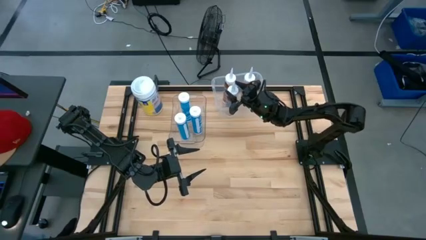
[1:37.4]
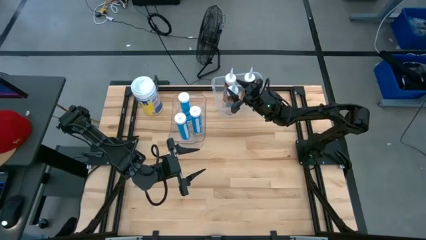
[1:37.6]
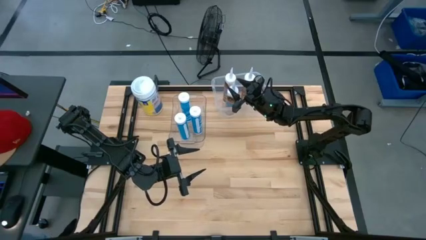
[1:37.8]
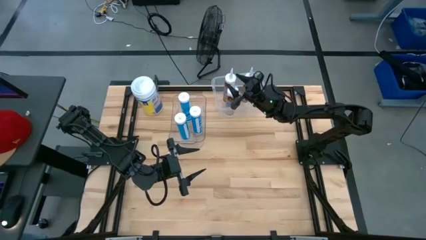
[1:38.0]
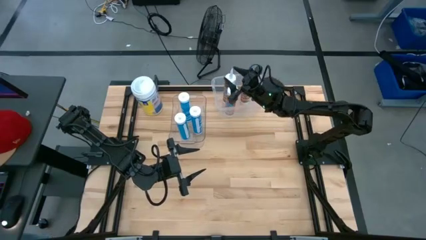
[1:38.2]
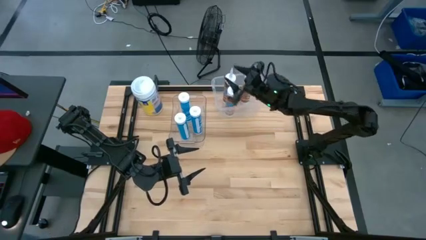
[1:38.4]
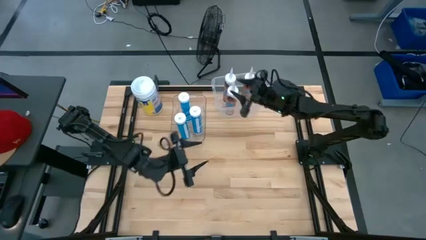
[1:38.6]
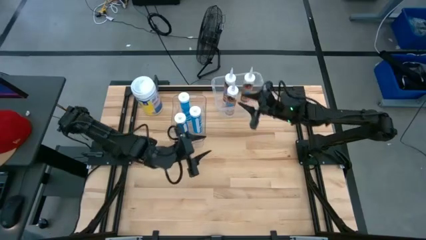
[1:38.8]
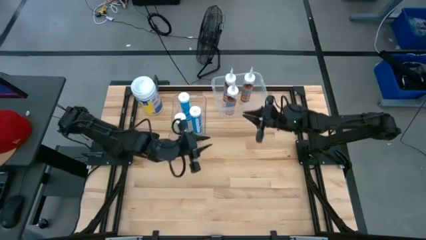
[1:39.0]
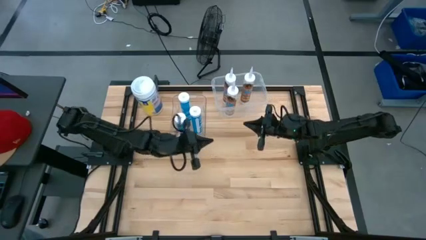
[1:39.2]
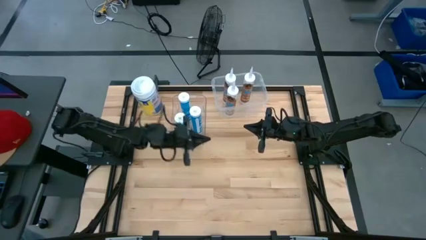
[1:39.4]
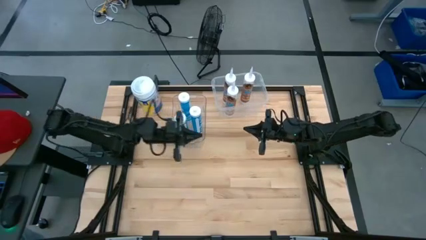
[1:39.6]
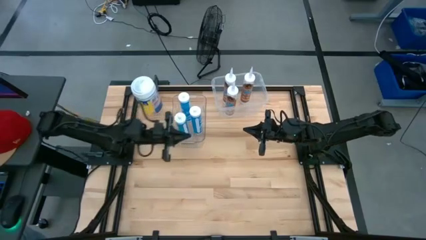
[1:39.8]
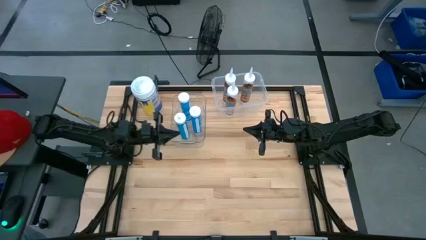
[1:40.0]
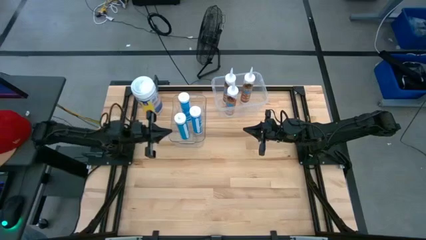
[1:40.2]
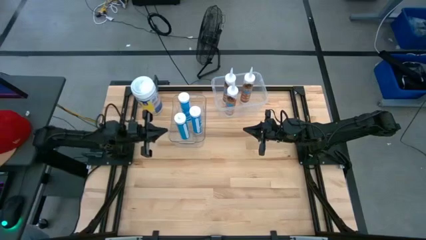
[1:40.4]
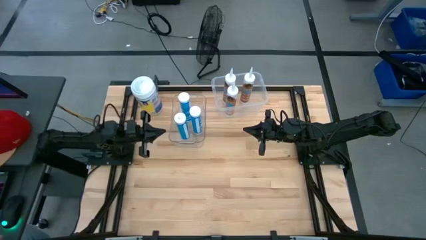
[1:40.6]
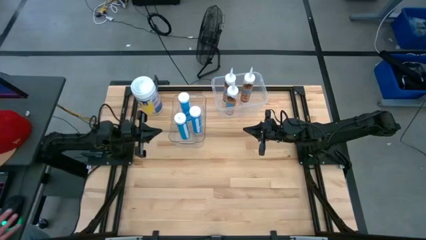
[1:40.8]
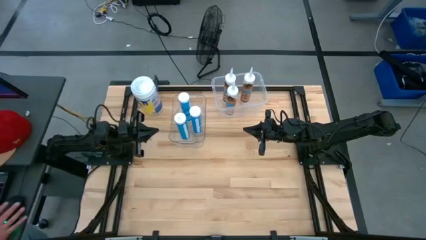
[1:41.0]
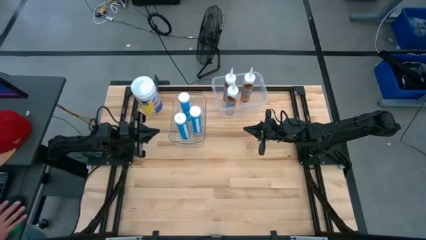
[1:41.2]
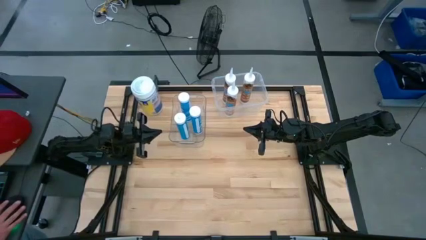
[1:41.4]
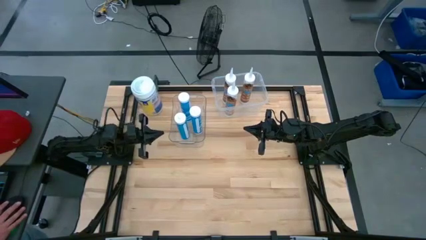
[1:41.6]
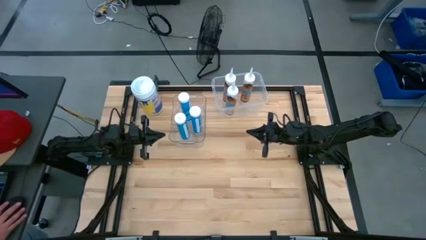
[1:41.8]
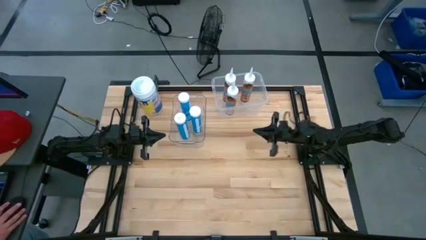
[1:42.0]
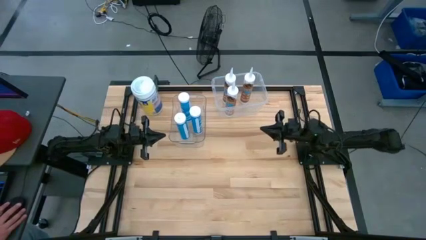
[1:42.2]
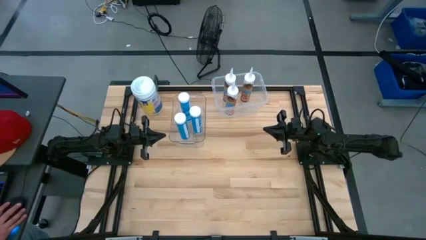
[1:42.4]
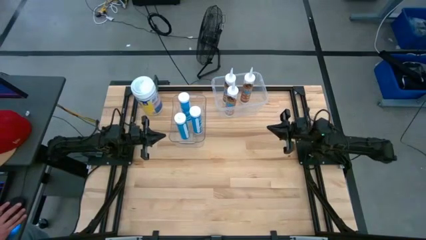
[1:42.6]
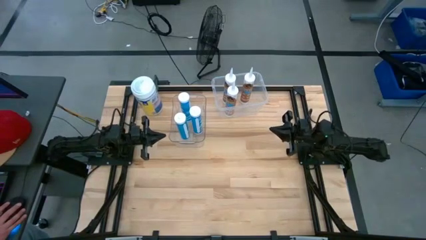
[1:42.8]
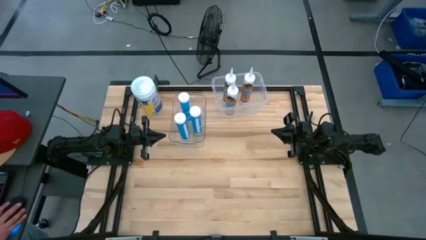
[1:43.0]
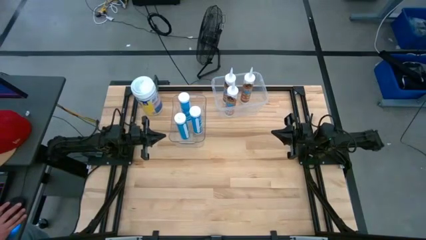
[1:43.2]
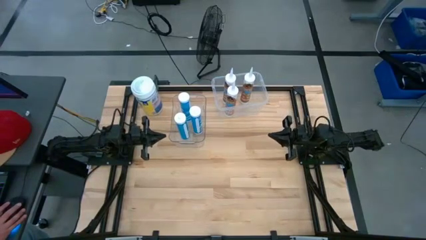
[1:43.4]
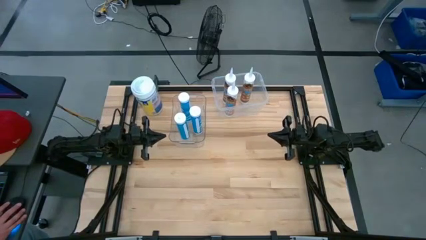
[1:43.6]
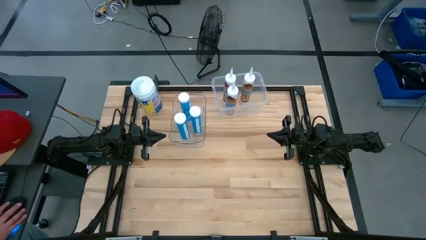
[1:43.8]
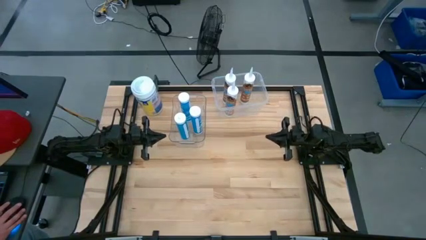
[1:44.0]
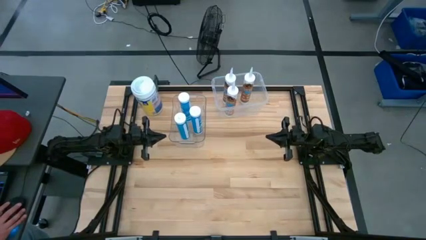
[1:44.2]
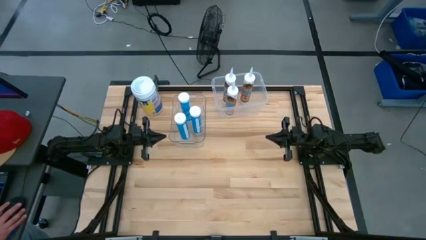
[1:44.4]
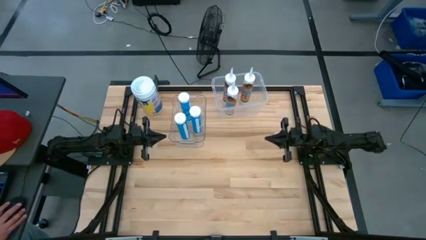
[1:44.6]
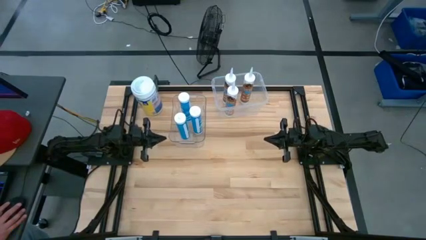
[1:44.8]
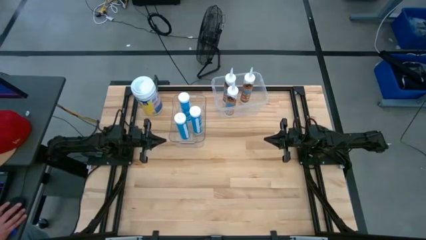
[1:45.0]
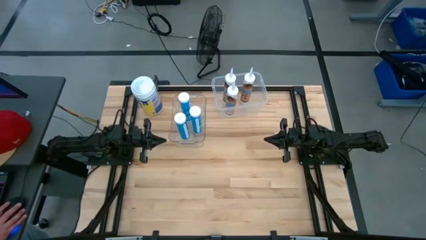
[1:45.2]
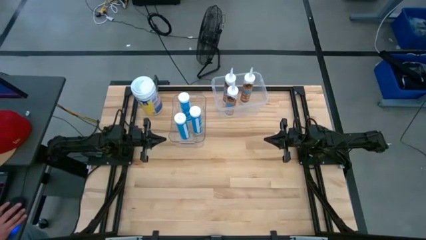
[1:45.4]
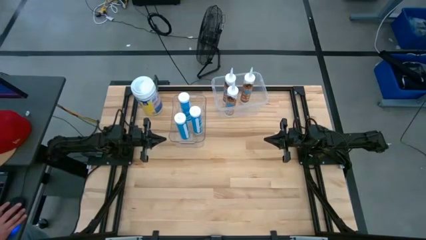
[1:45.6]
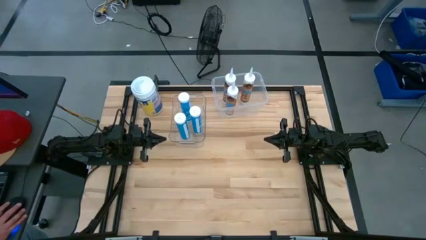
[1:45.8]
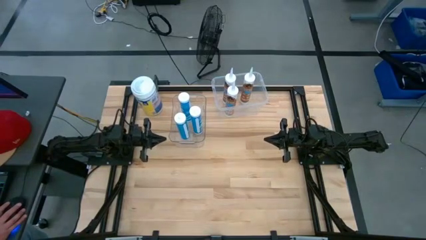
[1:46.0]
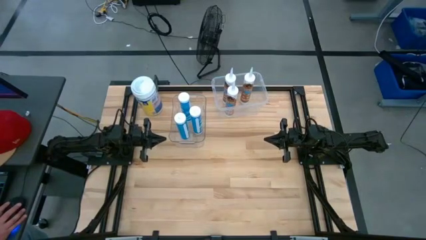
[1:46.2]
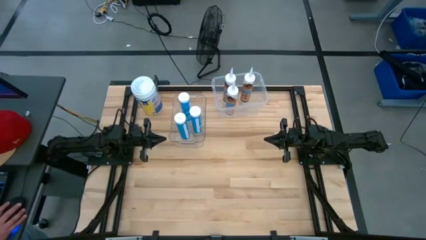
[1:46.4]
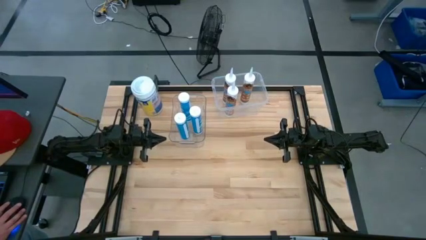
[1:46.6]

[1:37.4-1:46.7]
Task: Pick & place silicon tubes, Sealant and Lysol wipes
Return to Home Position

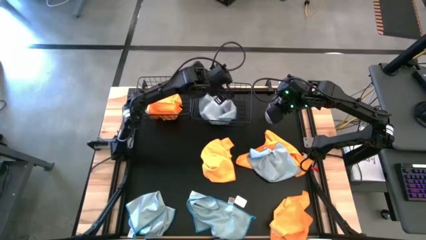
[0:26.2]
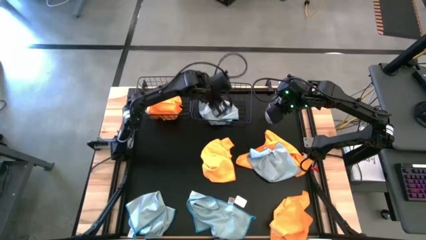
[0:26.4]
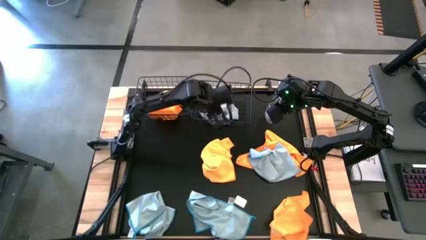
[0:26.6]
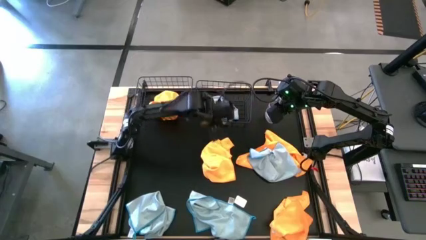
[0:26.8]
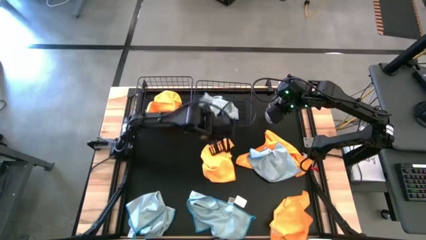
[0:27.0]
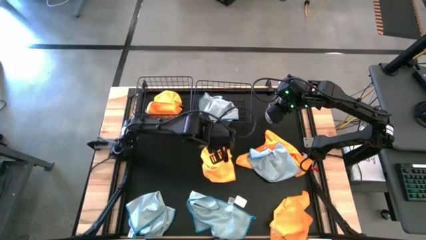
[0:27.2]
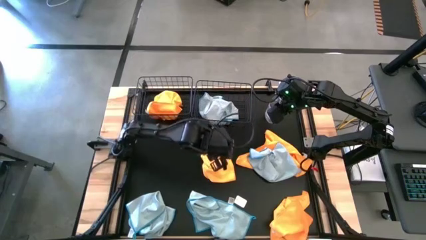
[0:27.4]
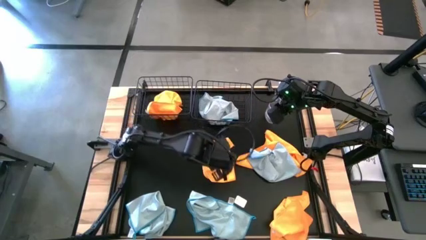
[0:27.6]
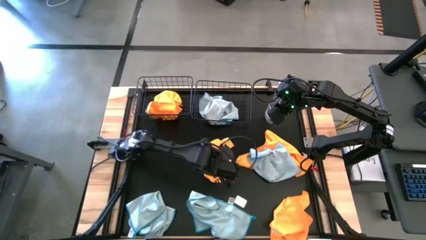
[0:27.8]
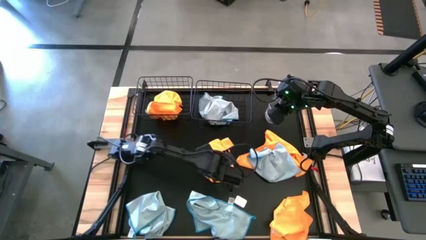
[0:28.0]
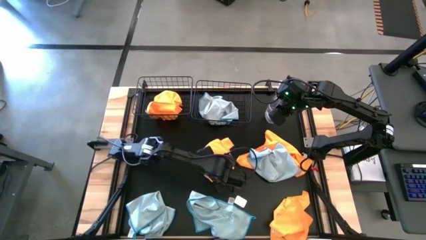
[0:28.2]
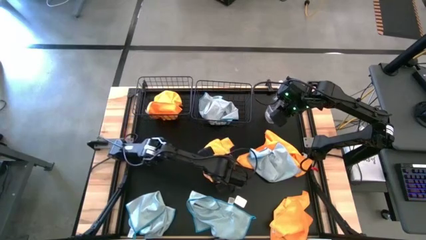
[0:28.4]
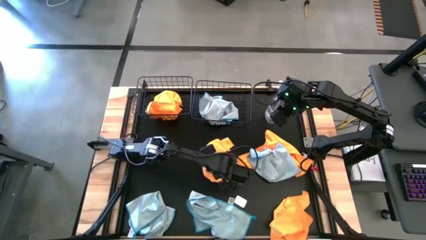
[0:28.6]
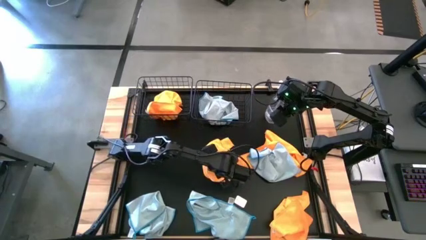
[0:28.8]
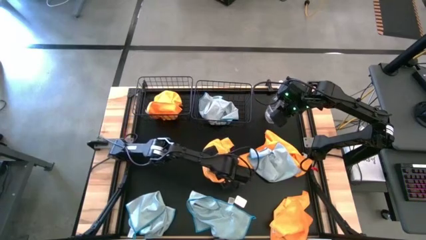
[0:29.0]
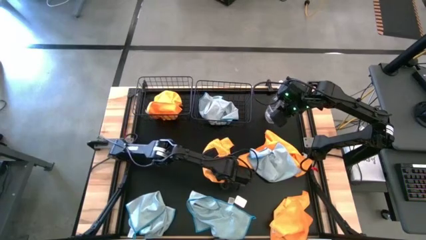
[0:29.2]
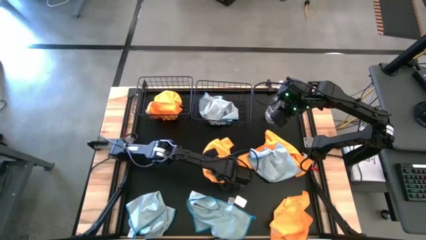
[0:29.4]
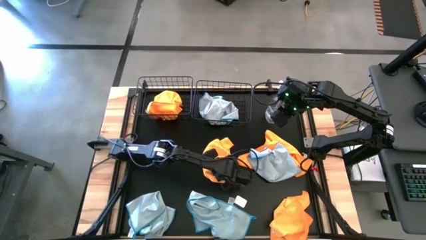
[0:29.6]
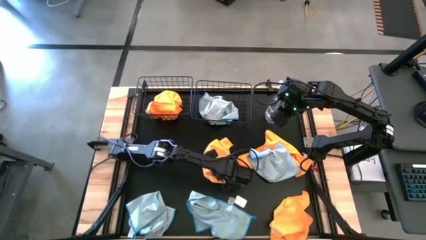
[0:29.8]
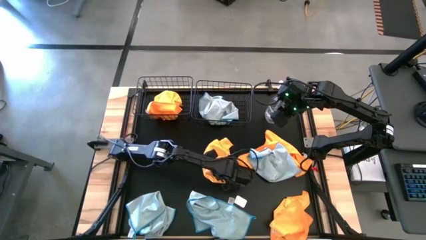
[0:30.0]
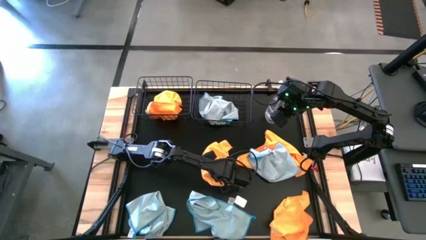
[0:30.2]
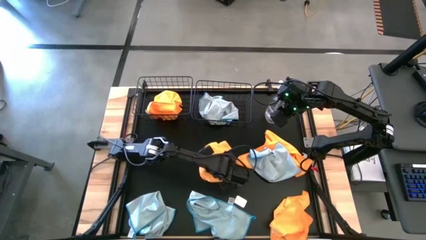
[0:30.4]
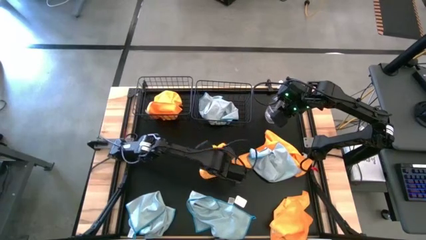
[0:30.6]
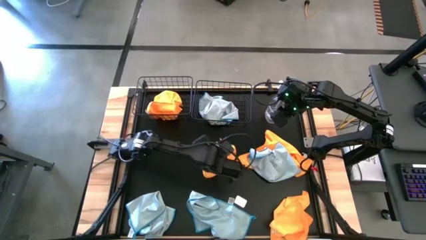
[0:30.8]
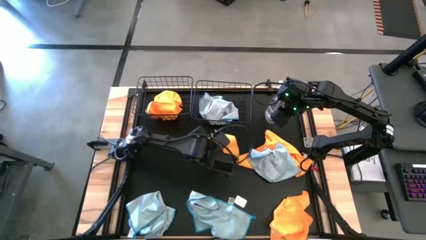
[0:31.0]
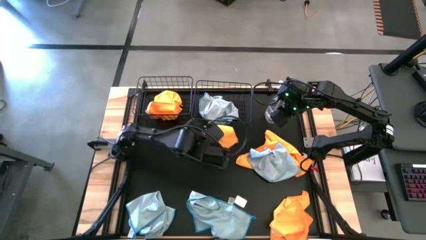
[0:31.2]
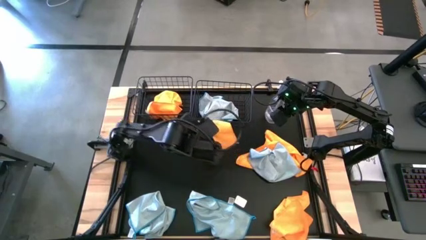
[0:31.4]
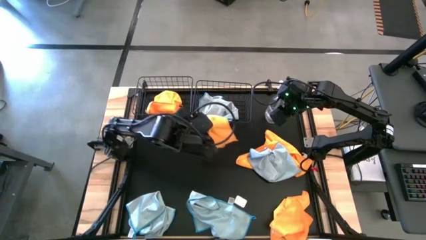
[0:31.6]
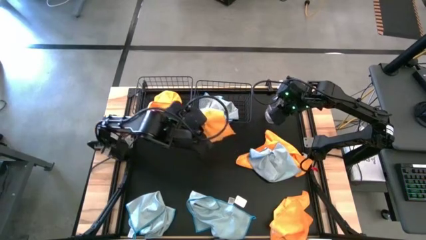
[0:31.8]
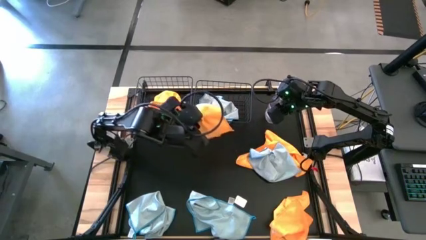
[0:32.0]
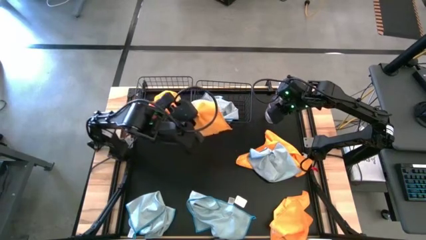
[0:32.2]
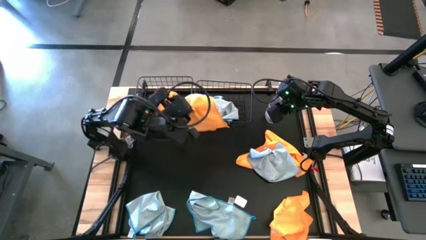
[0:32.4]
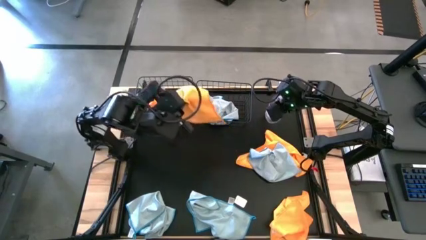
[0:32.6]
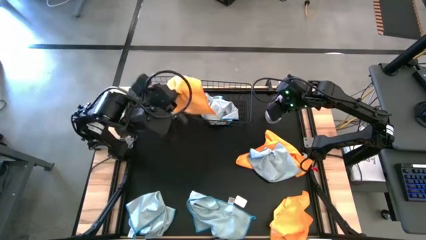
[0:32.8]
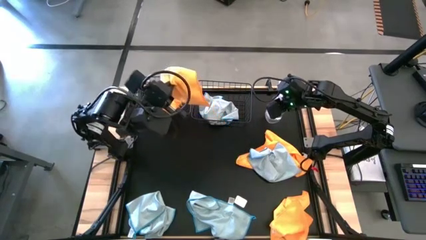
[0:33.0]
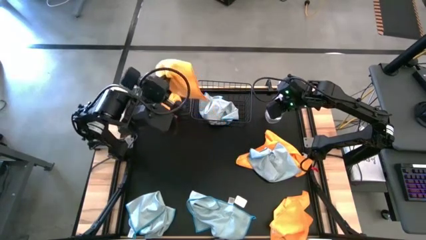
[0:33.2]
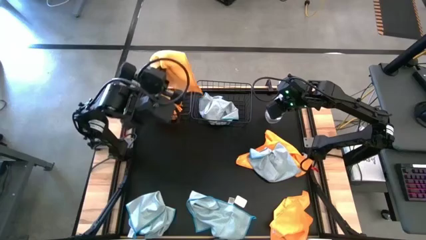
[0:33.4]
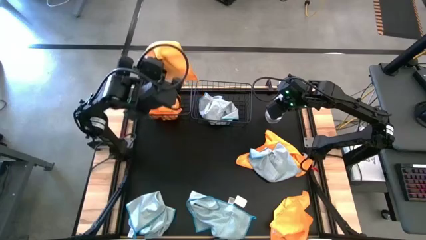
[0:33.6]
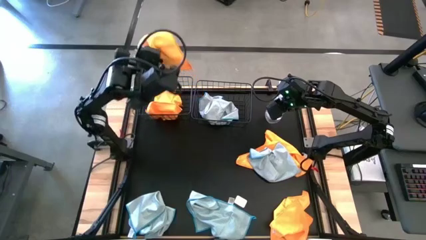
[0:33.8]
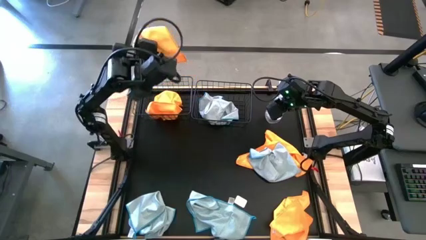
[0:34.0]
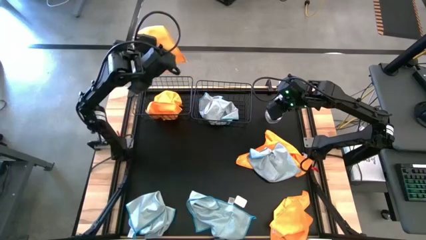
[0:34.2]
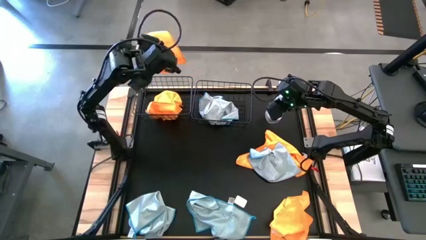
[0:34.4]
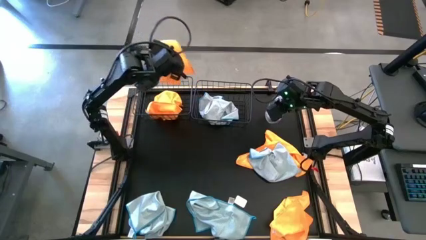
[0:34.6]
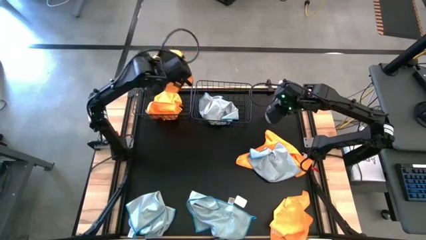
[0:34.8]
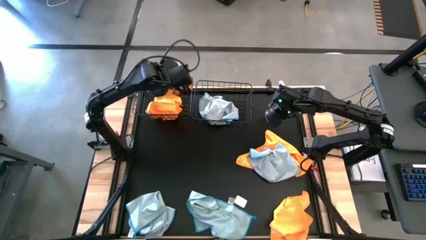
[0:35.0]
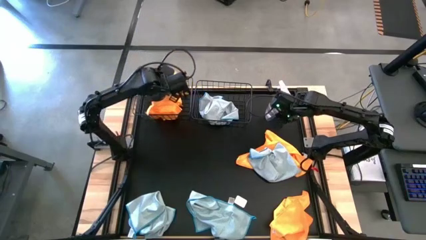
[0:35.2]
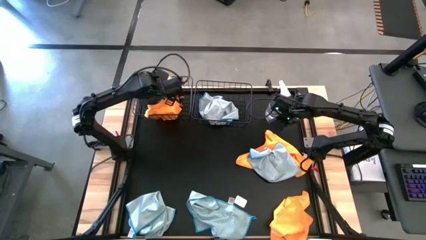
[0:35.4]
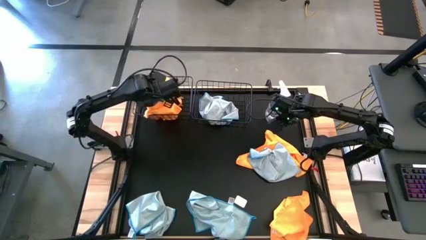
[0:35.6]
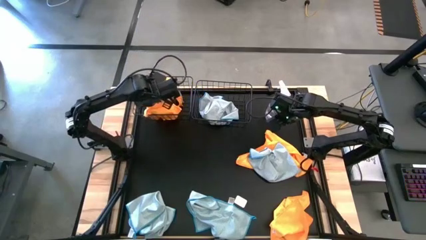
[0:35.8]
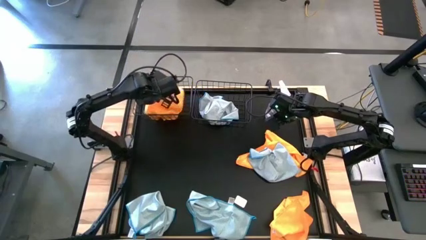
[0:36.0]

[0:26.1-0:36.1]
Task: Sort microfiber towel by color & place in baskets
Put the yellow microfiber cloth into the left black wire basket
